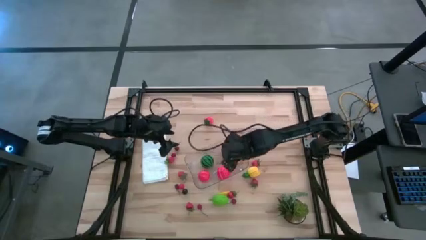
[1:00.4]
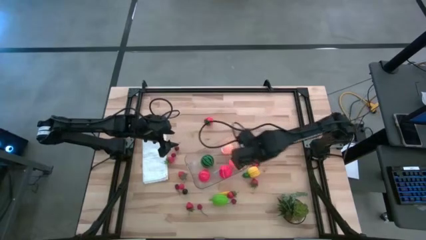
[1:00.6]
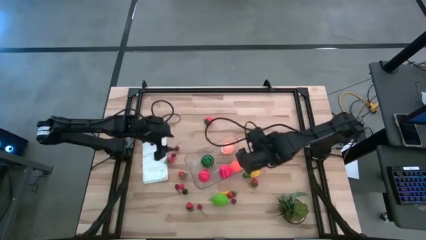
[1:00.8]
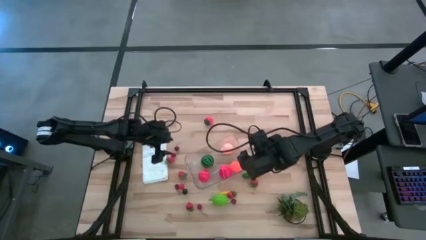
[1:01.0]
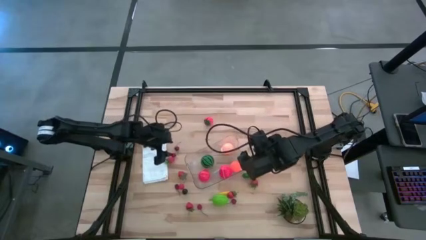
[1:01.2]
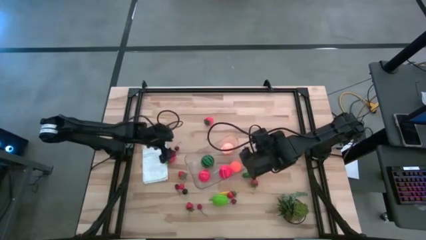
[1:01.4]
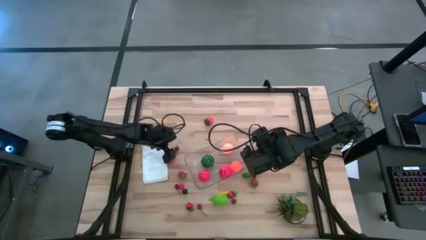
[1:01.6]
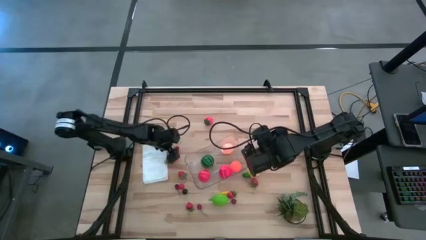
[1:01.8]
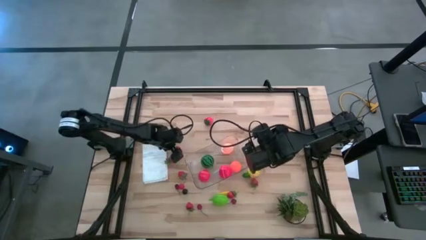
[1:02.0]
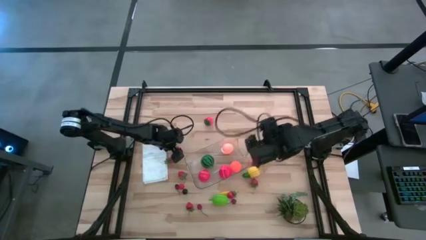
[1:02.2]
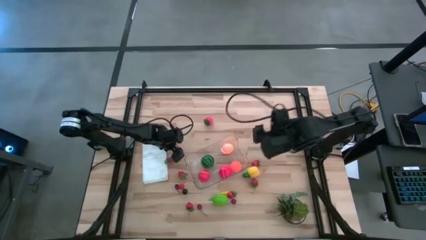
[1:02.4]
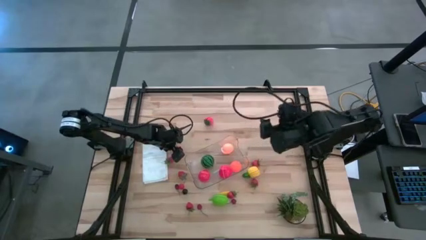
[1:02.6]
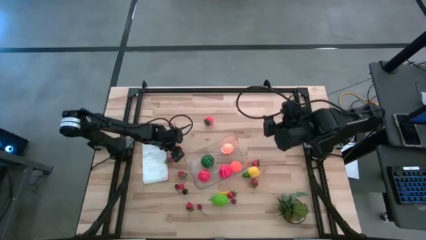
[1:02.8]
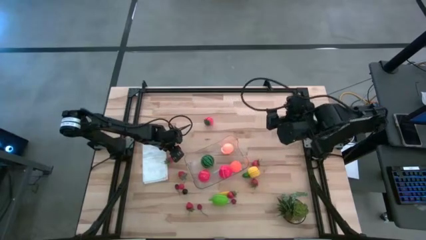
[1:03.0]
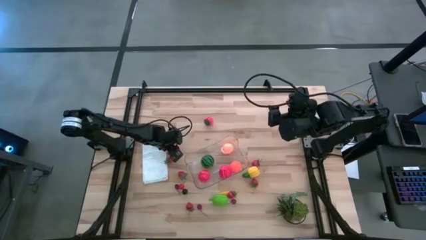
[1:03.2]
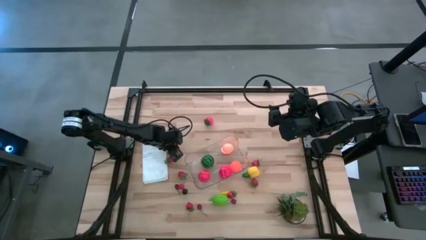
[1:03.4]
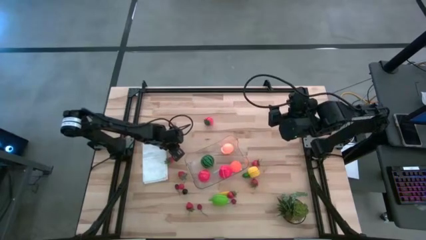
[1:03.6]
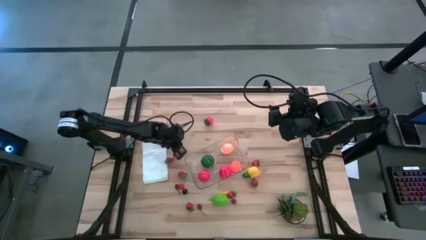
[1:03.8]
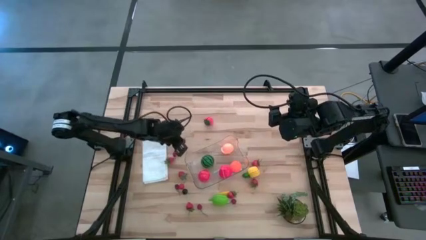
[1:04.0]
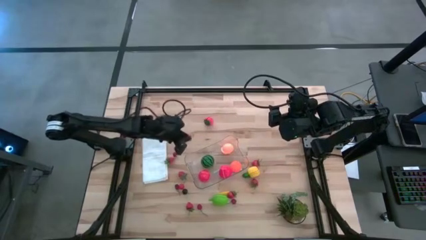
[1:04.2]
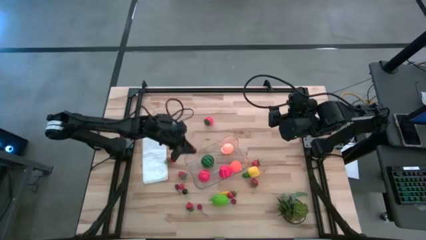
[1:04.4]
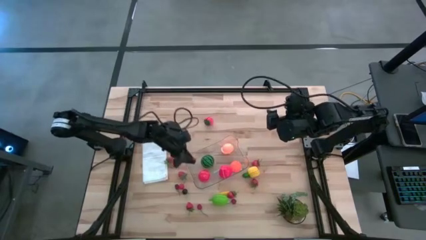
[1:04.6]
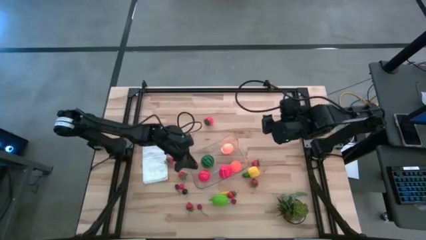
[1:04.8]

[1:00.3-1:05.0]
Task: Pick and placing Produce into tupperware
Put the dark red cherry into the transparent bin

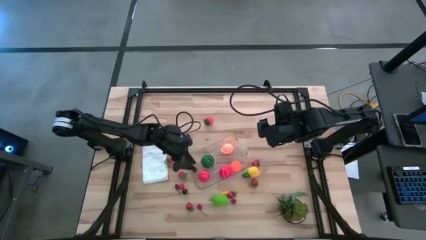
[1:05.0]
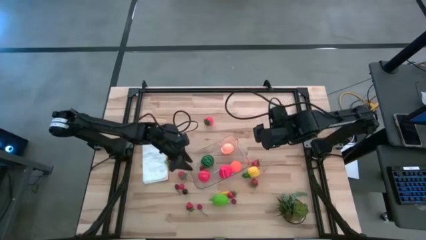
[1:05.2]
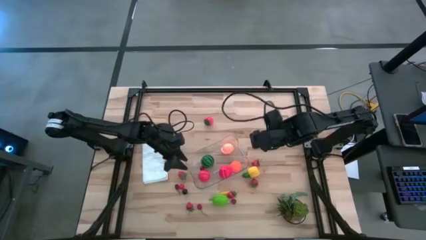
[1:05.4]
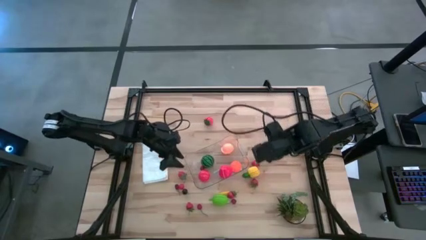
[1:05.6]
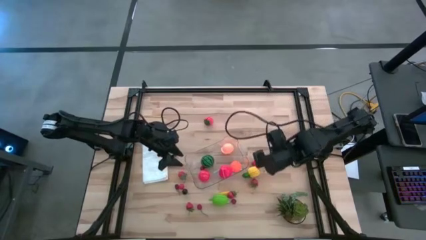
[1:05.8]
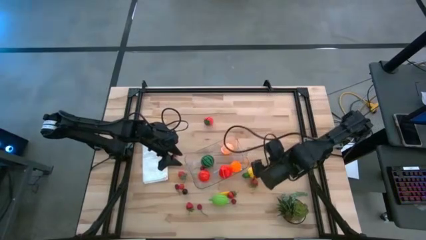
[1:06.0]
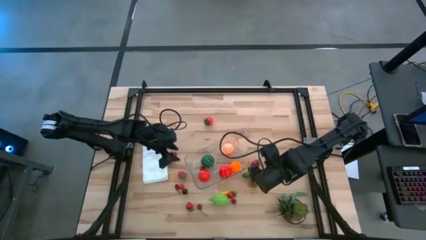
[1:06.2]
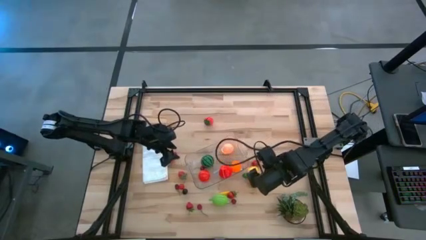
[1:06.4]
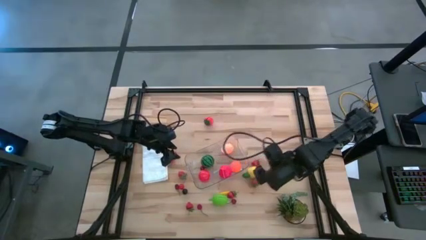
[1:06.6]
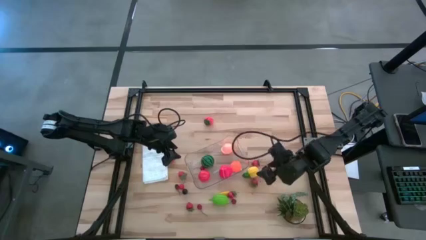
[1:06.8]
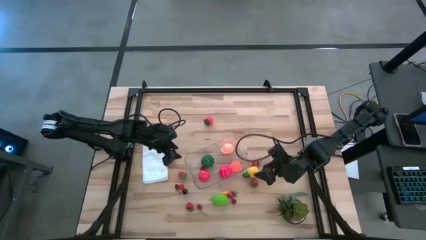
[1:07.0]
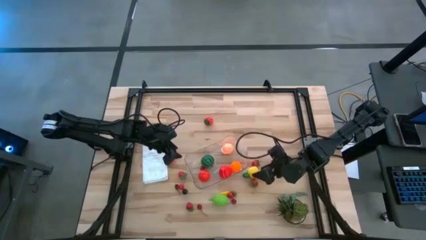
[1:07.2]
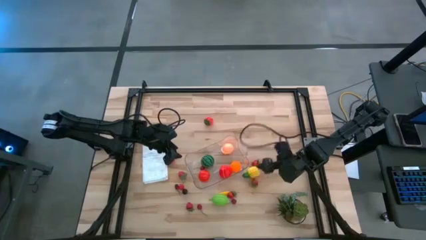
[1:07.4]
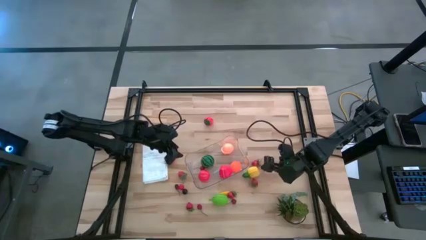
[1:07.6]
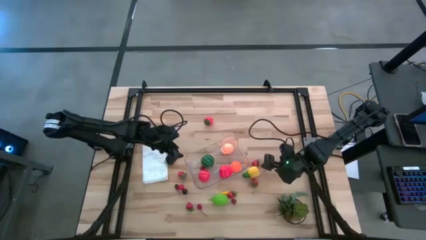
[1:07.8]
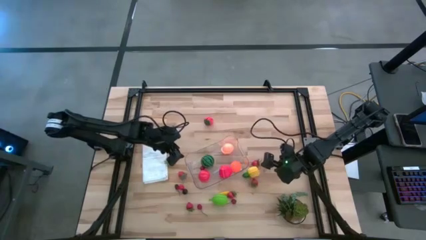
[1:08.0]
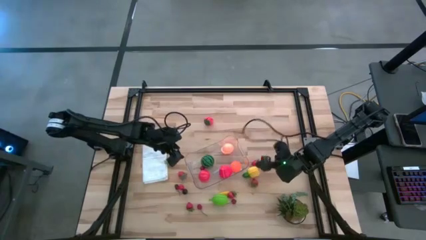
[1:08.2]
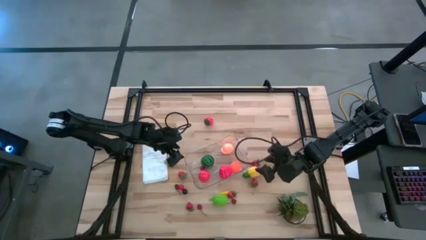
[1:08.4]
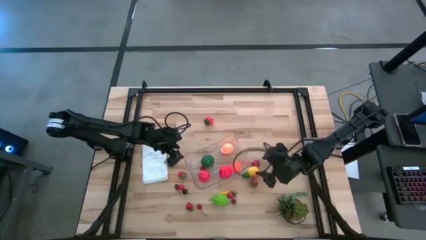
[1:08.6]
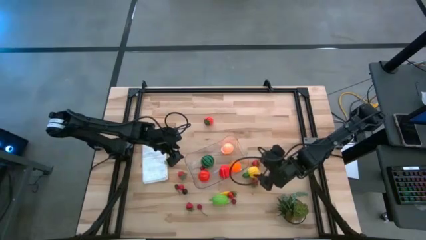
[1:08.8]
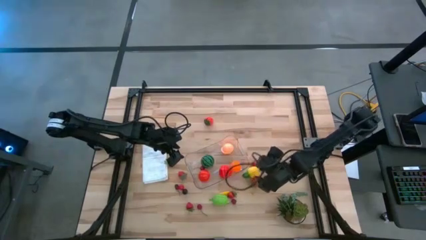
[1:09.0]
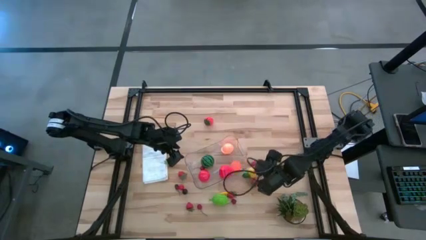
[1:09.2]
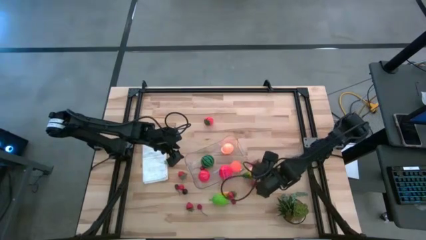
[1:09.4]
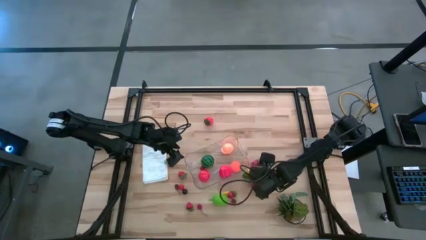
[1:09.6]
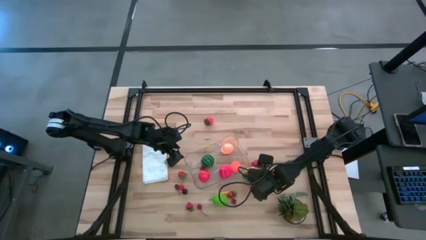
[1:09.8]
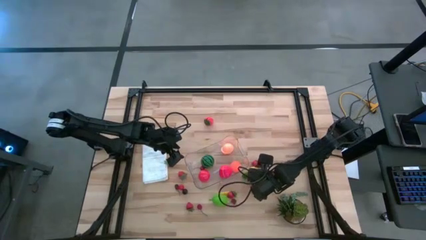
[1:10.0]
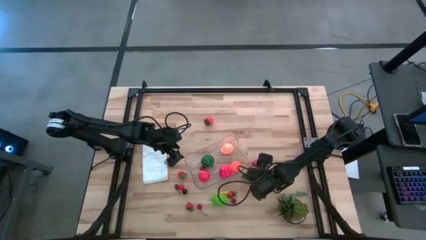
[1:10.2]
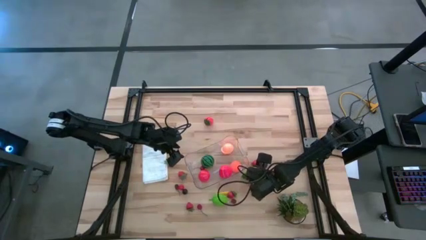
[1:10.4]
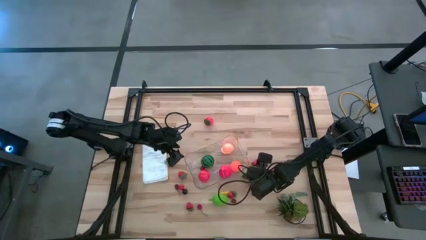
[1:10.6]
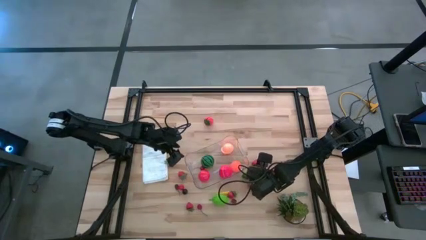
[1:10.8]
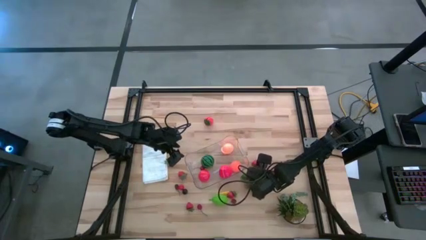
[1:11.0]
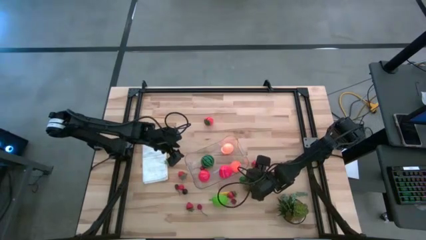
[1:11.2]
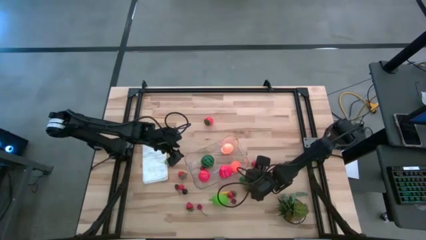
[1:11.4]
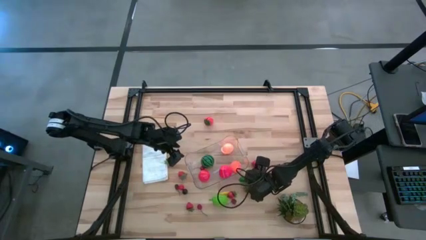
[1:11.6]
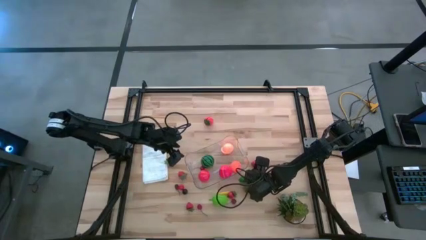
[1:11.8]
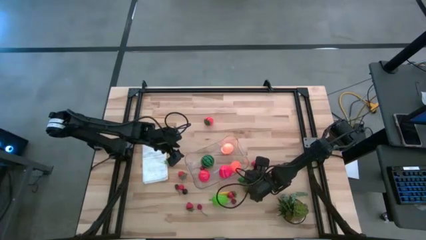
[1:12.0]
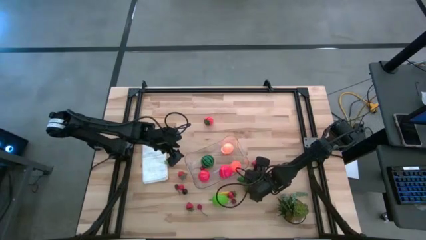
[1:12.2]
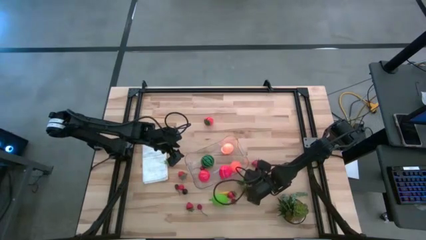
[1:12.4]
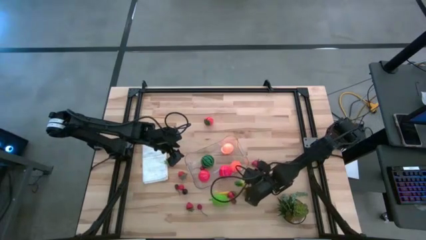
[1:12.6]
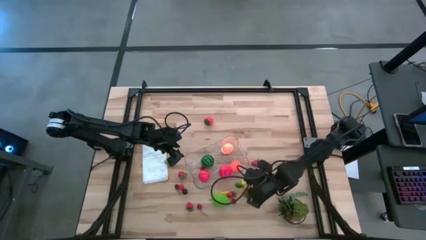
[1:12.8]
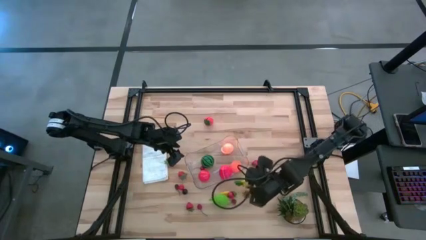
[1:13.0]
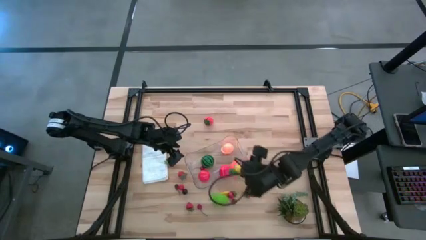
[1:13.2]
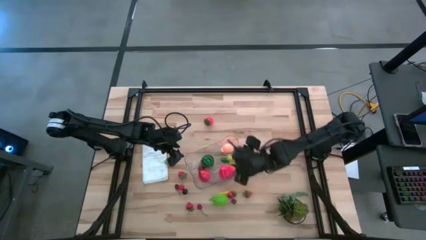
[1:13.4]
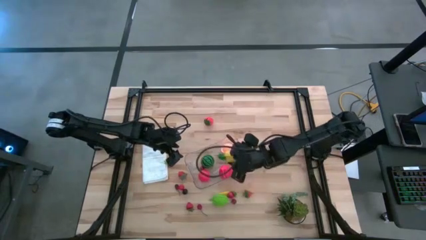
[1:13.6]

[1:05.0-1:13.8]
Put the pineapple into the transparent bin

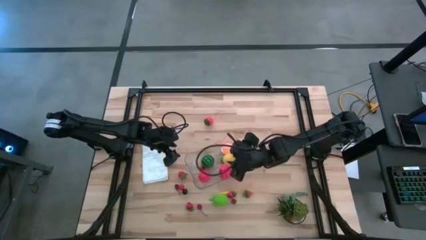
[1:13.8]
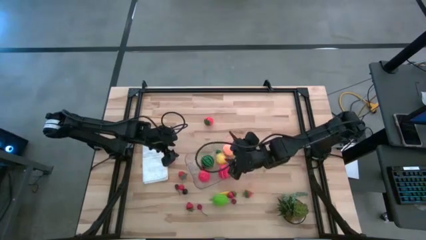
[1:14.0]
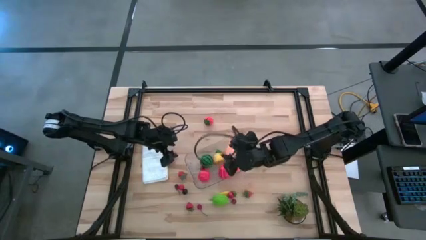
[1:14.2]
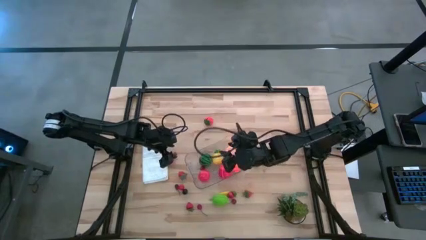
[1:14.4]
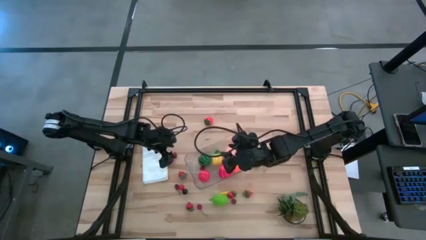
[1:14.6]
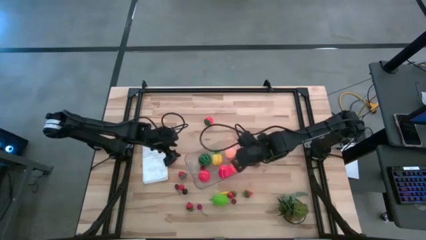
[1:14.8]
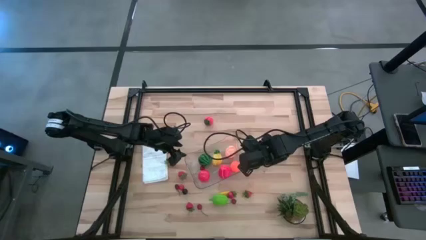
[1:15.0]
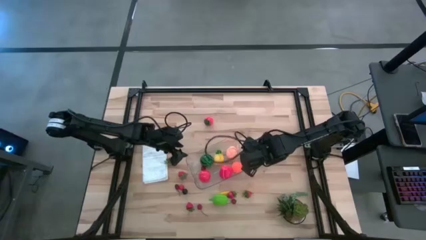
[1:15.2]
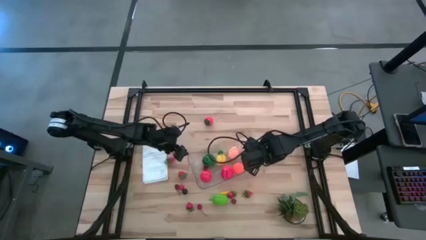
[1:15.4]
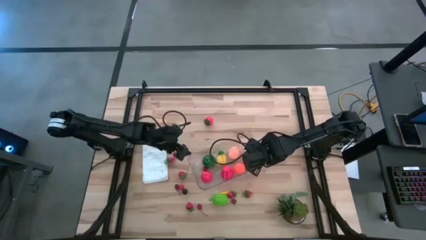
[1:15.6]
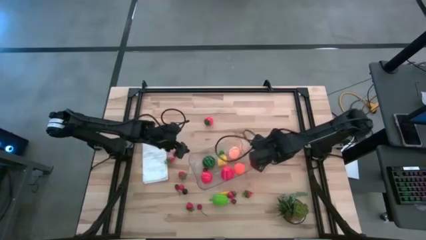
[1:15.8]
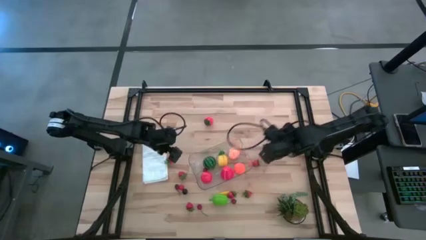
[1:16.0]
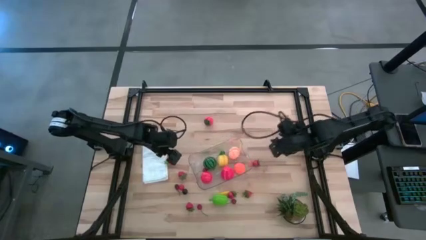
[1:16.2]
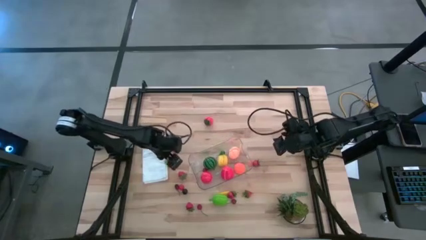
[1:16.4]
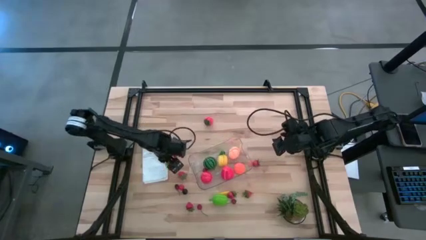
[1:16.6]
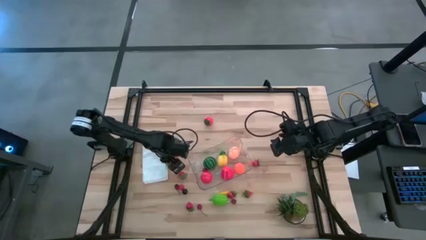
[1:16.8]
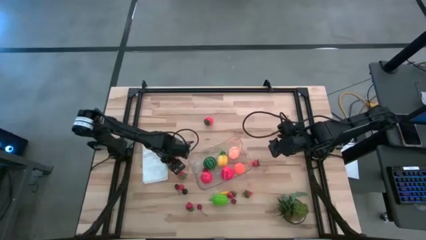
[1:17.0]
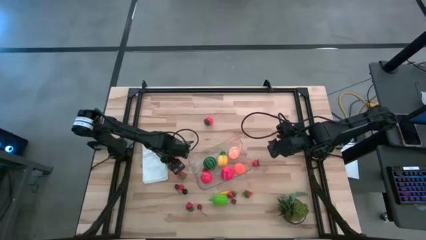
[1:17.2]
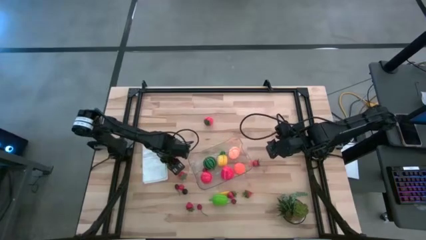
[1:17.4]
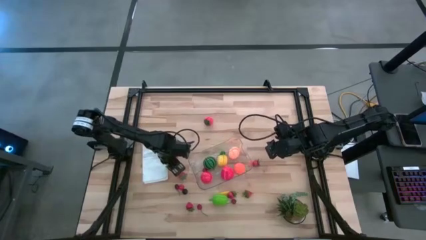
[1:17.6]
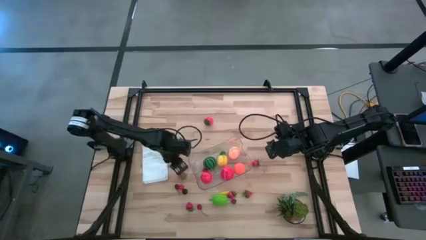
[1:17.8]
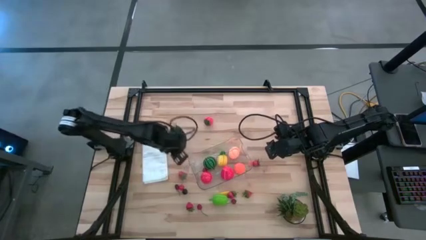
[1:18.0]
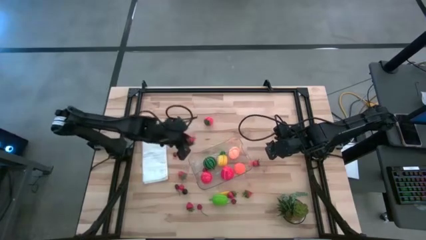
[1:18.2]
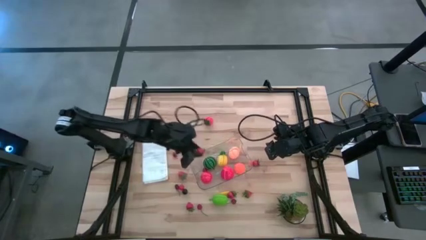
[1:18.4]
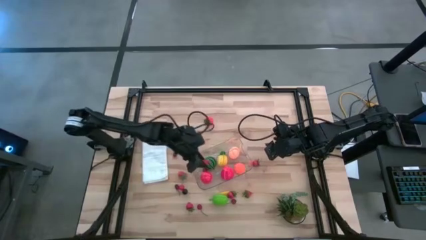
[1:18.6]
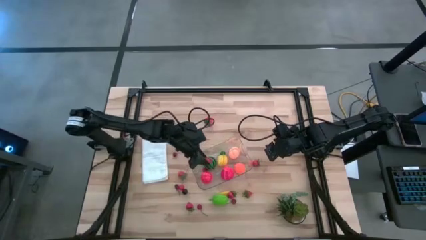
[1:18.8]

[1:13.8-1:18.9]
Put the strawberry into the transparent bin
